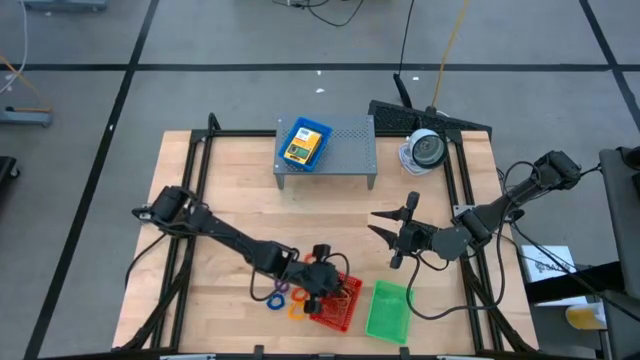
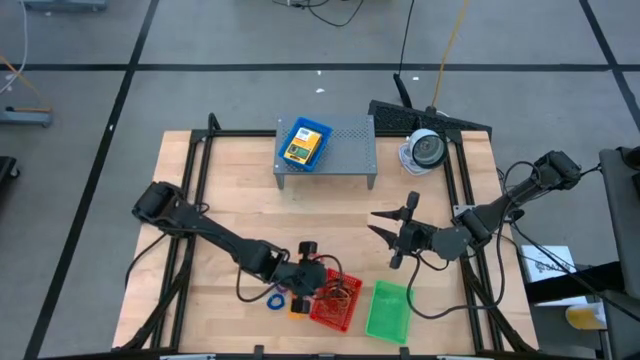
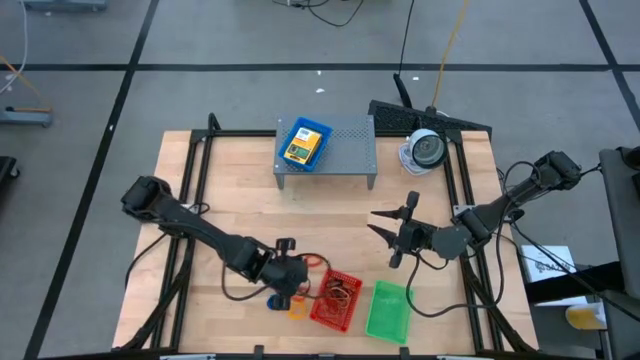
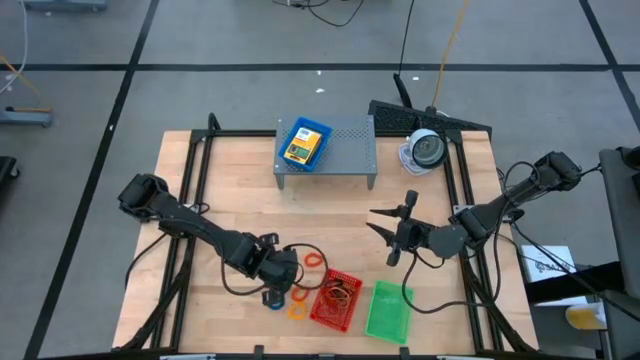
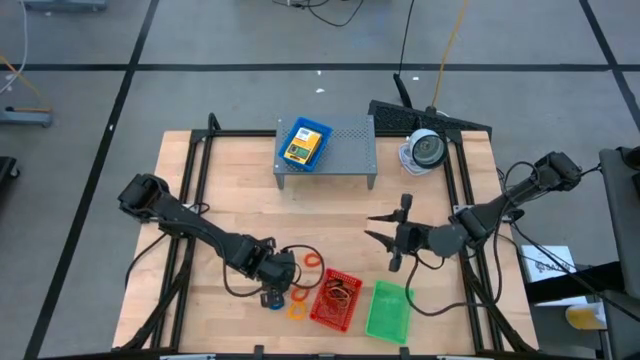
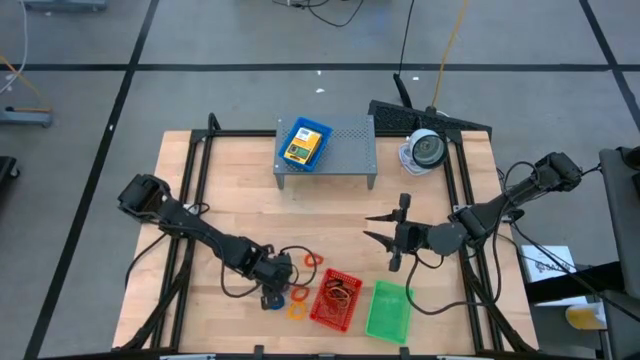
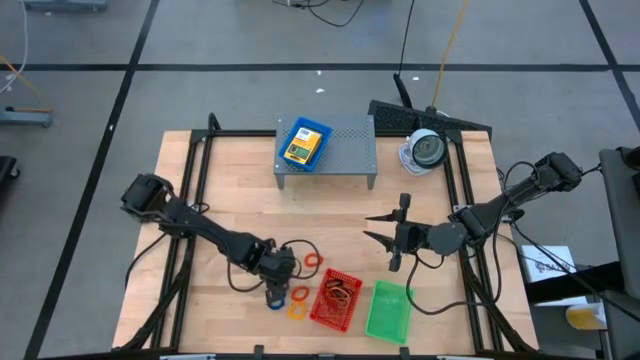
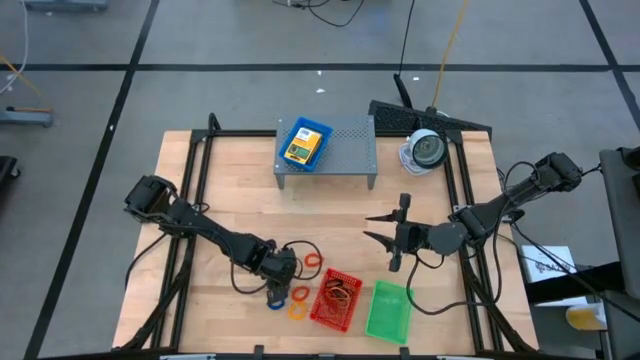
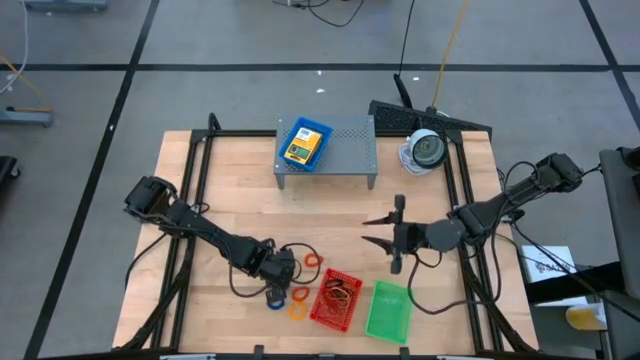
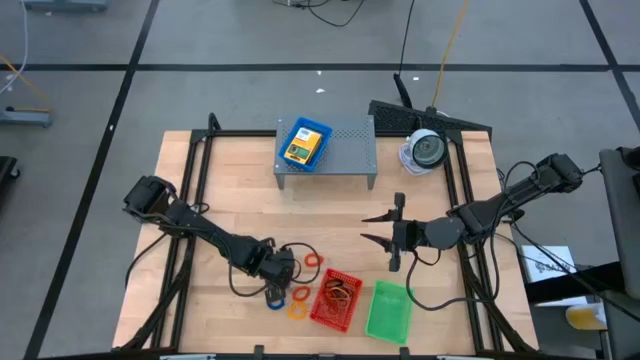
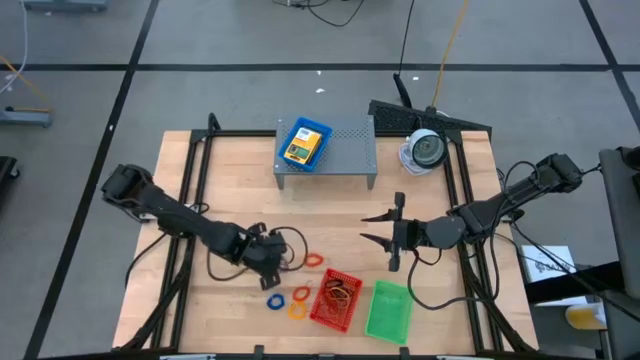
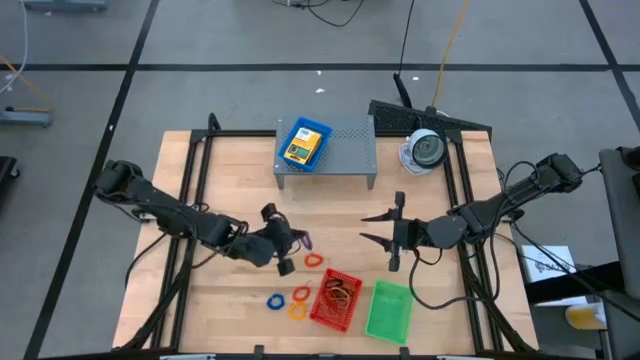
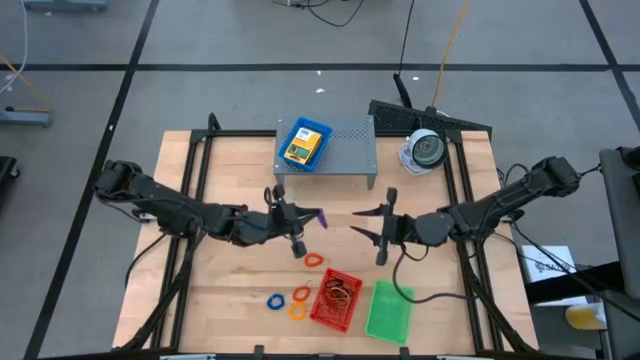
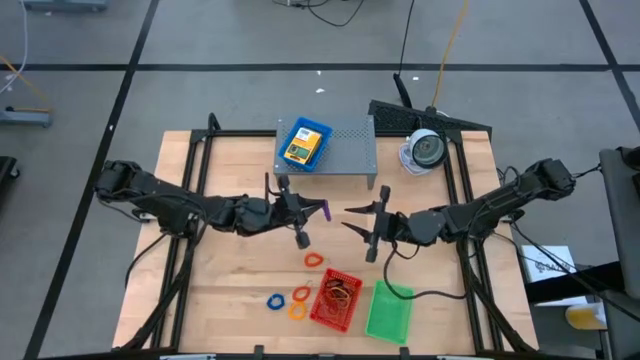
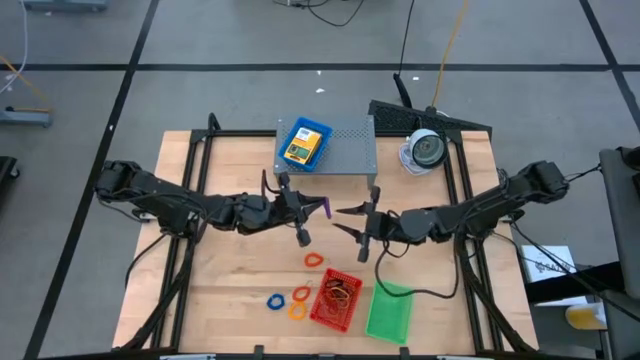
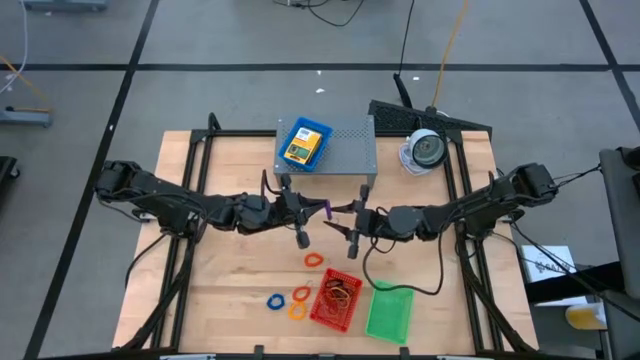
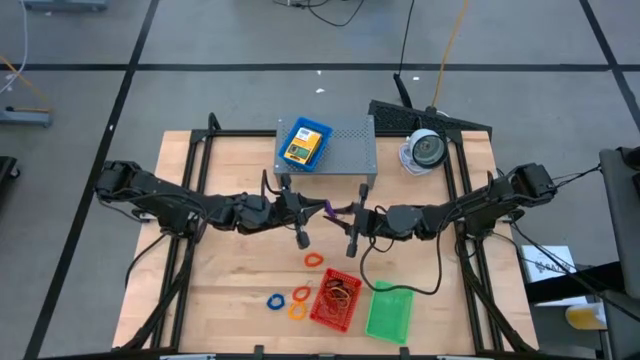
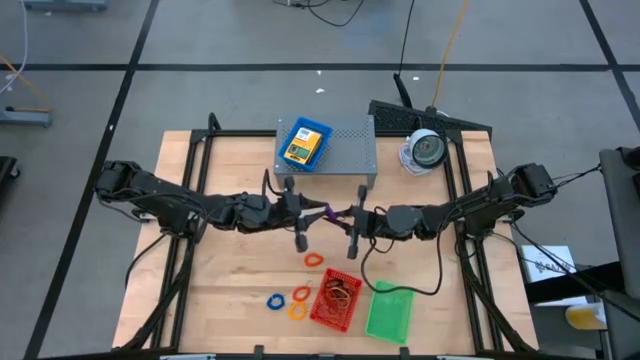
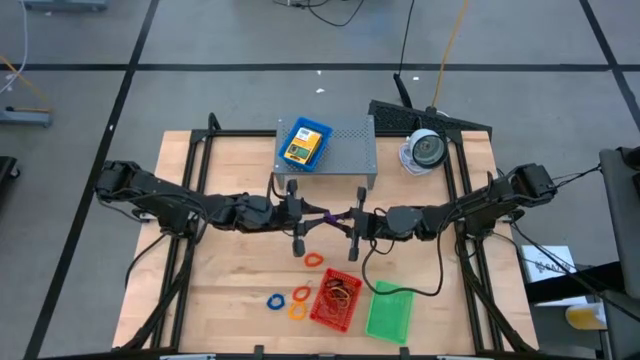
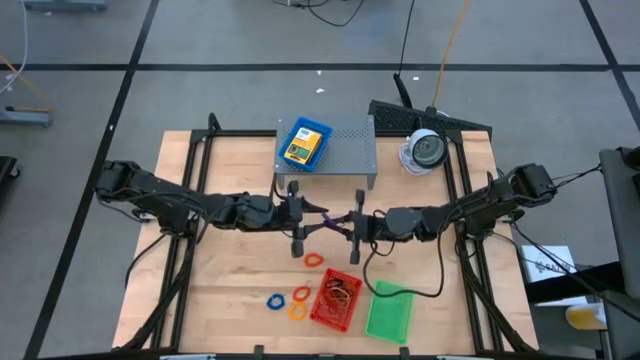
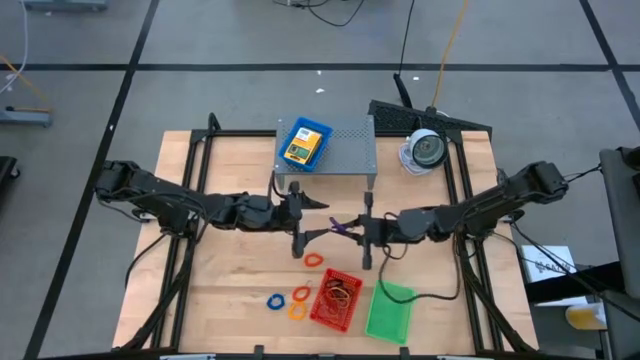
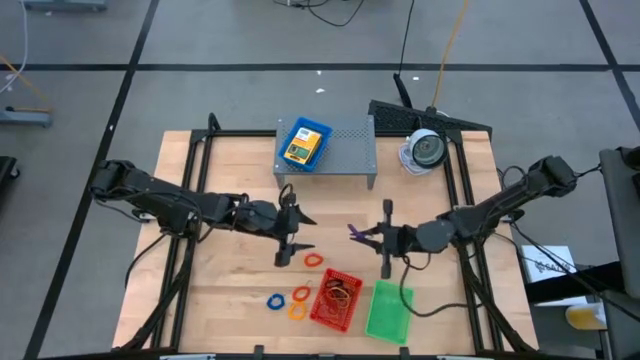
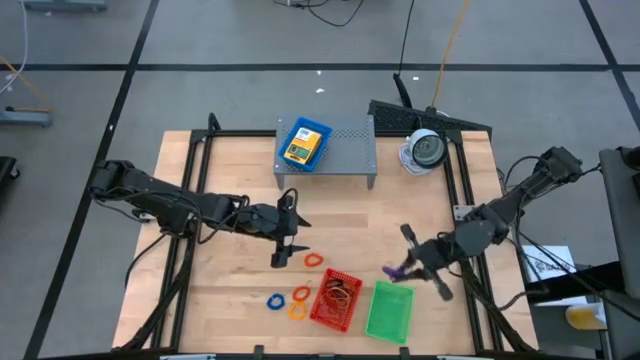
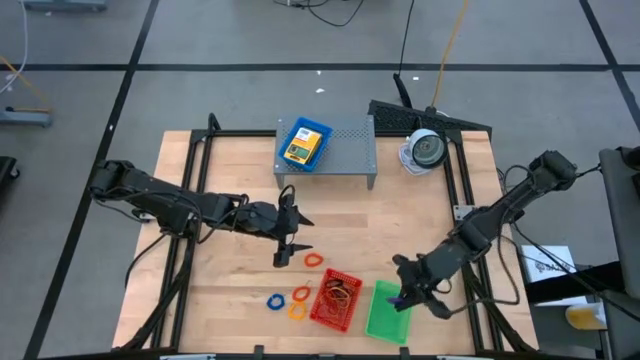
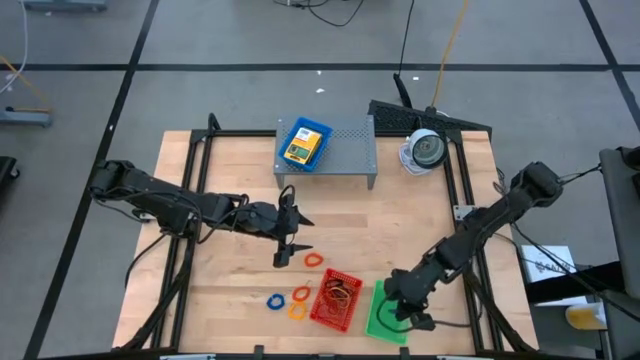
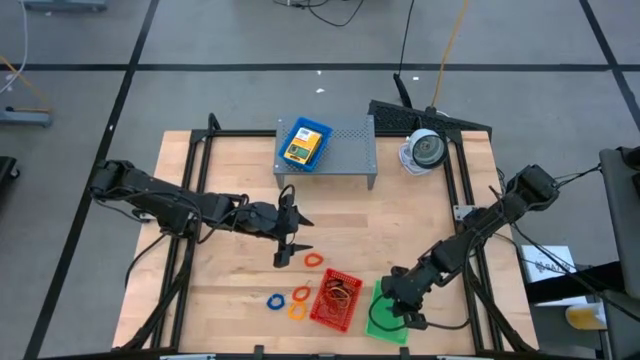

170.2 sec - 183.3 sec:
Task: Pick & Place Office Desk Supplies
Put the purple spring rubberband into the green bin

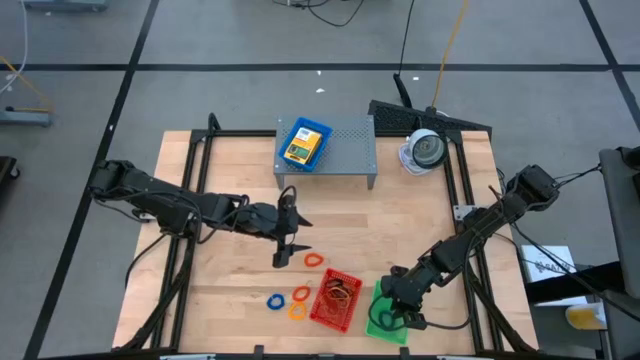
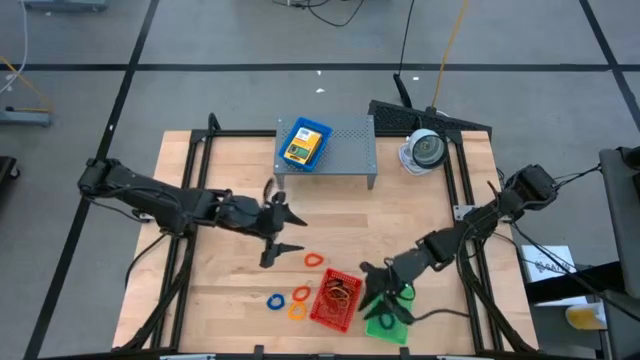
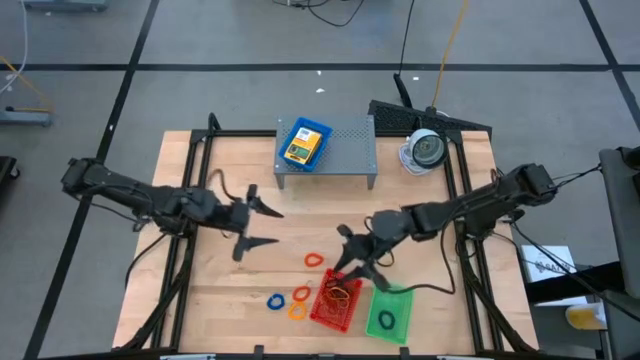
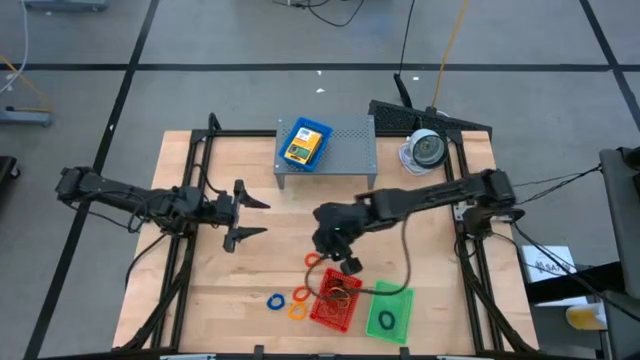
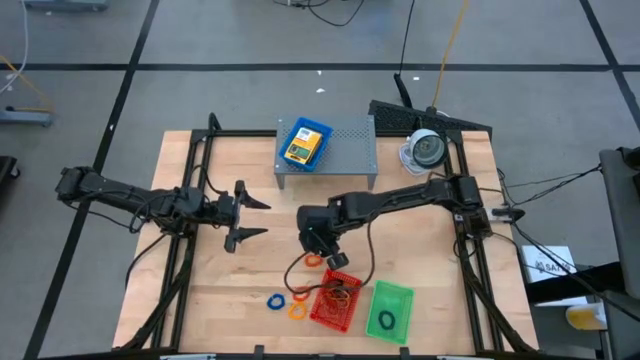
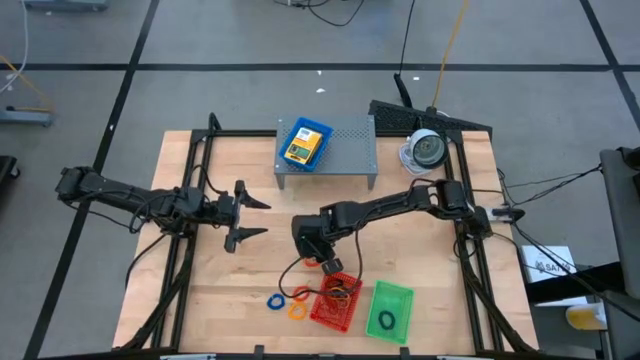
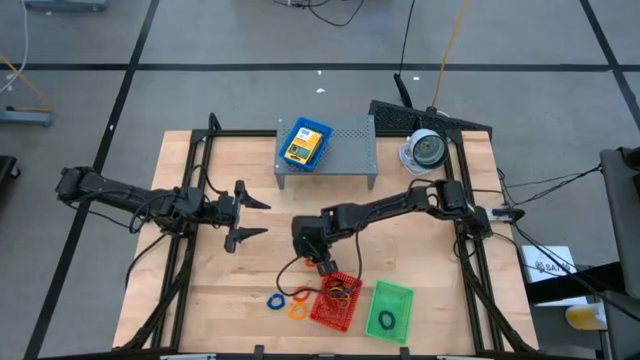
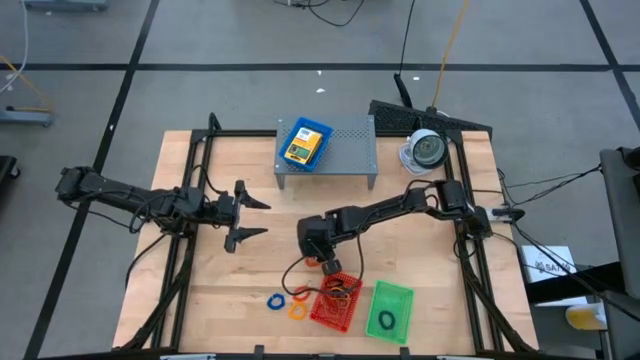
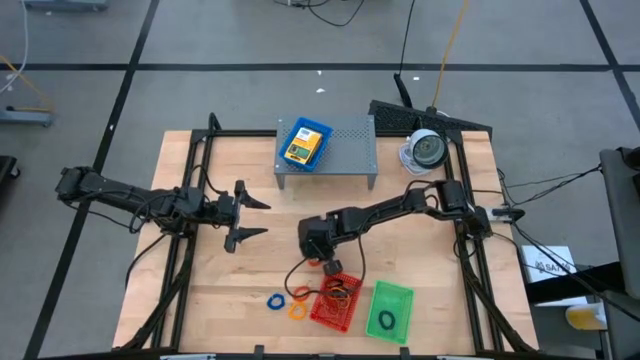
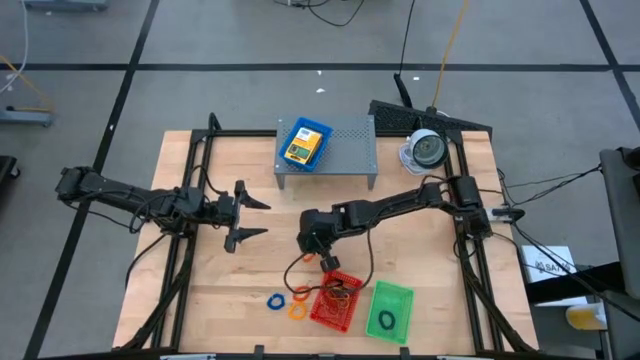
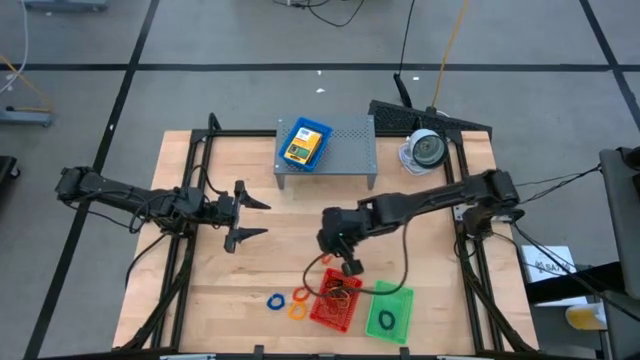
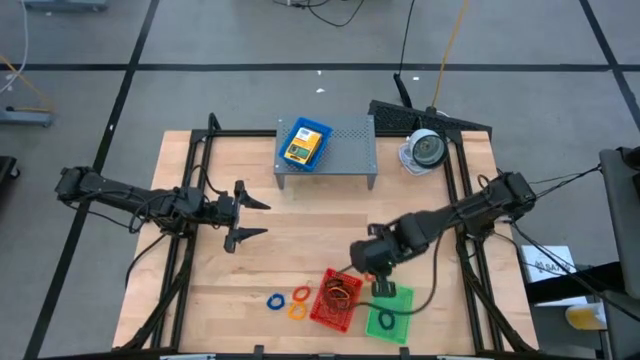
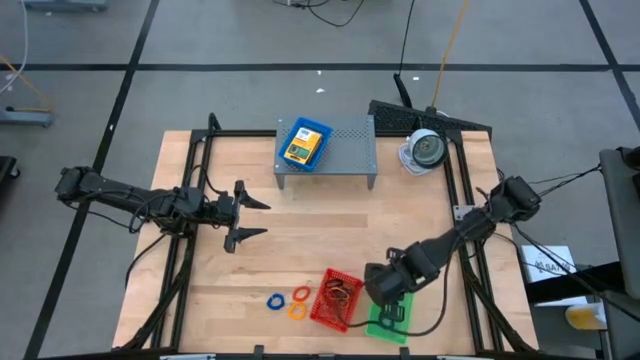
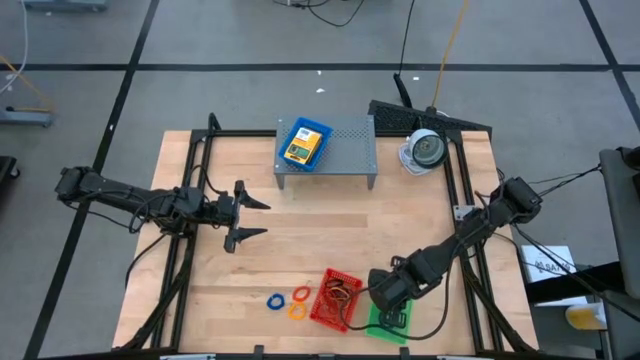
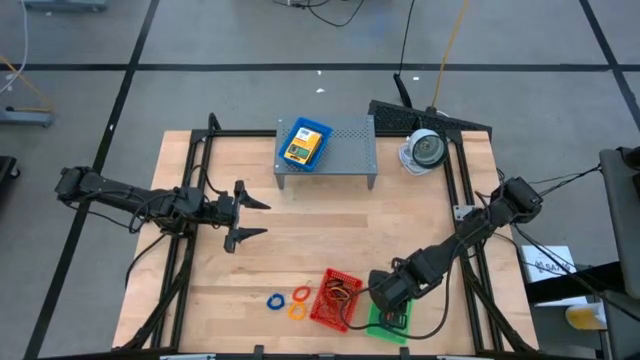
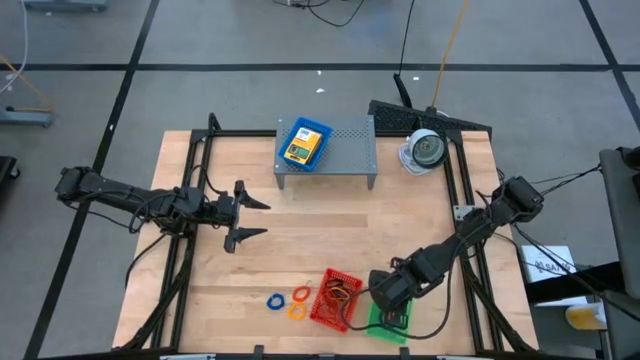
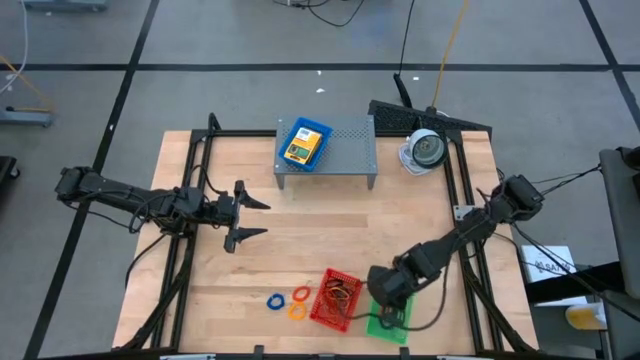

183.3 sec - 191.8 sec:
Put the orange spring rubberband into the green bin
